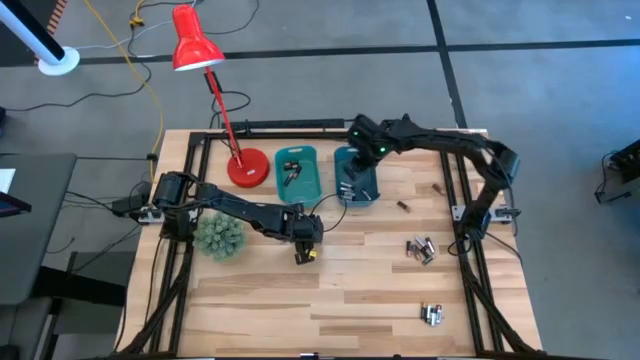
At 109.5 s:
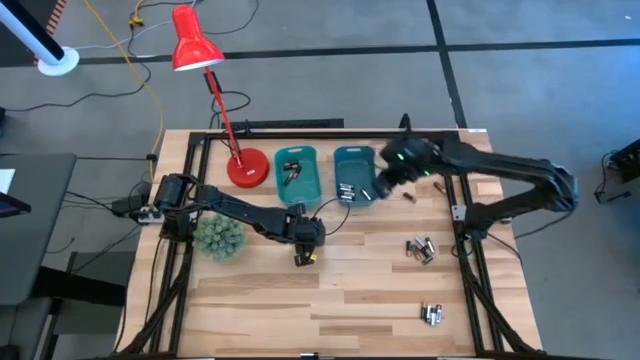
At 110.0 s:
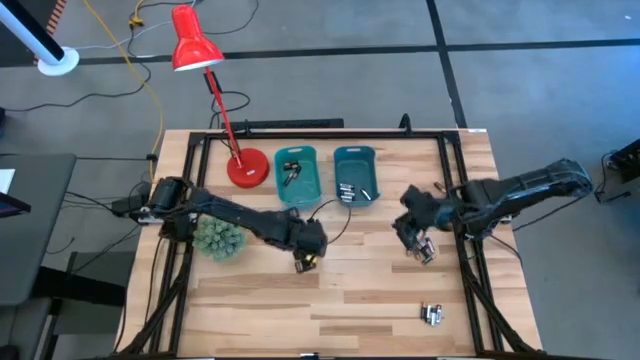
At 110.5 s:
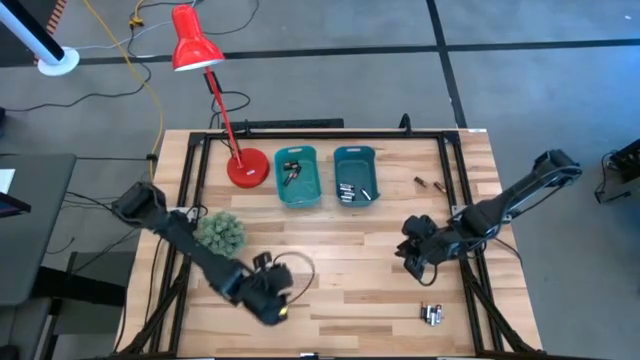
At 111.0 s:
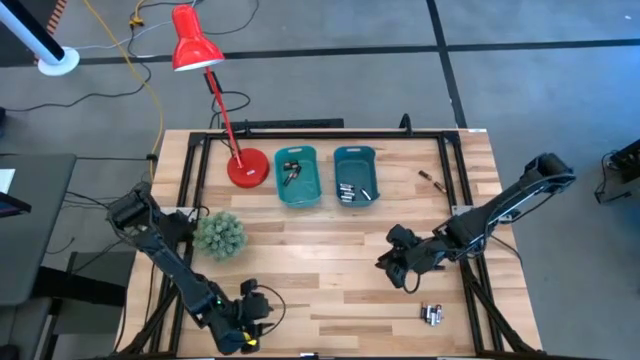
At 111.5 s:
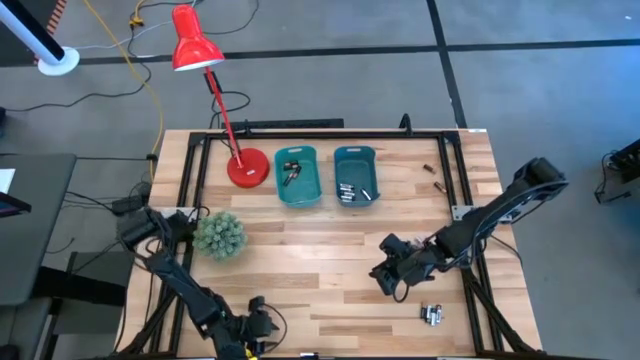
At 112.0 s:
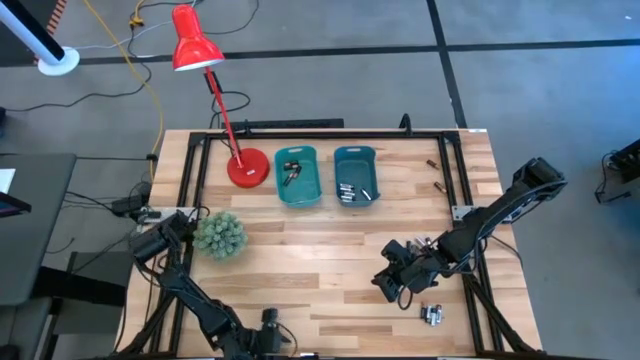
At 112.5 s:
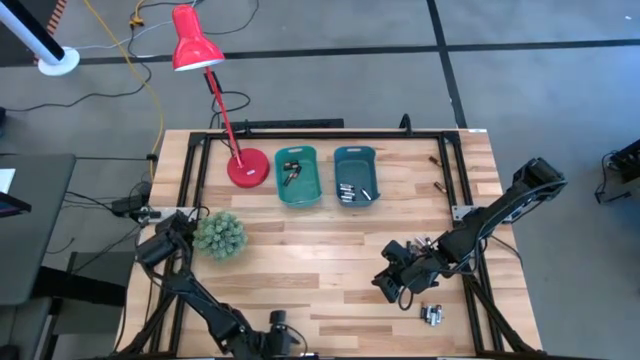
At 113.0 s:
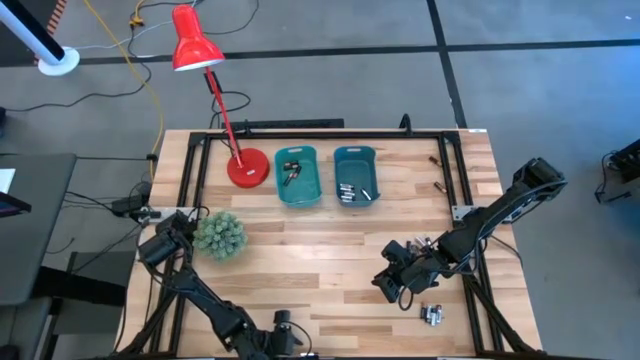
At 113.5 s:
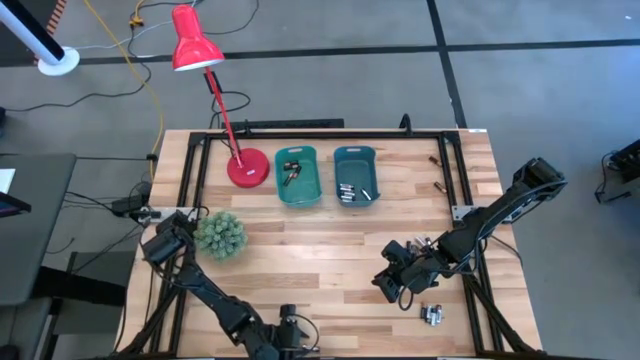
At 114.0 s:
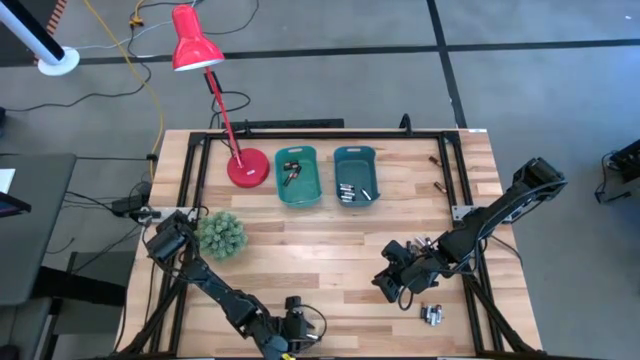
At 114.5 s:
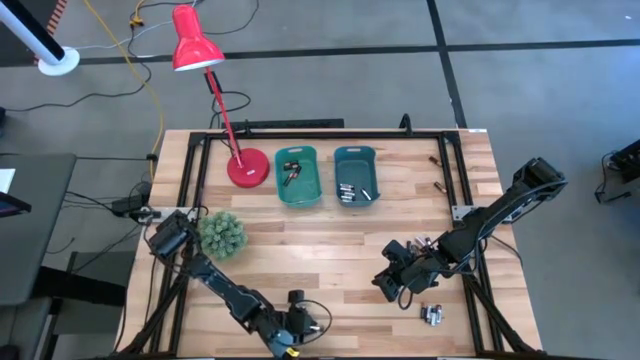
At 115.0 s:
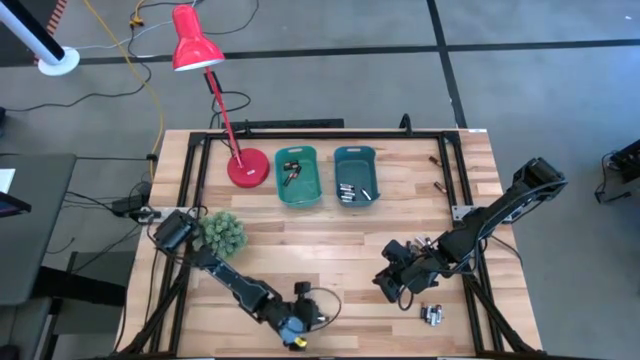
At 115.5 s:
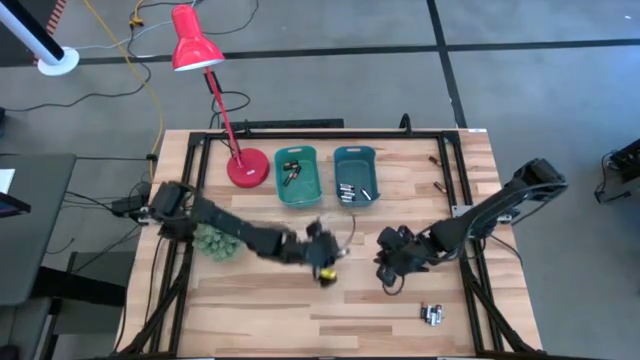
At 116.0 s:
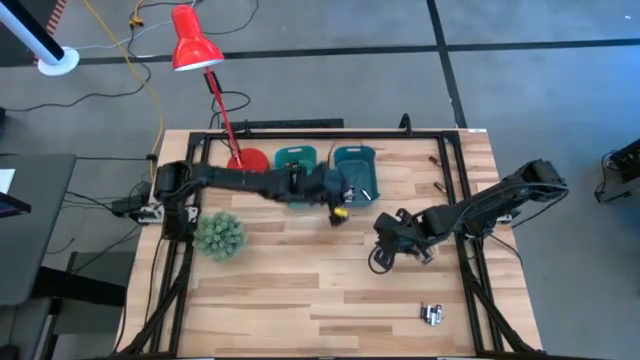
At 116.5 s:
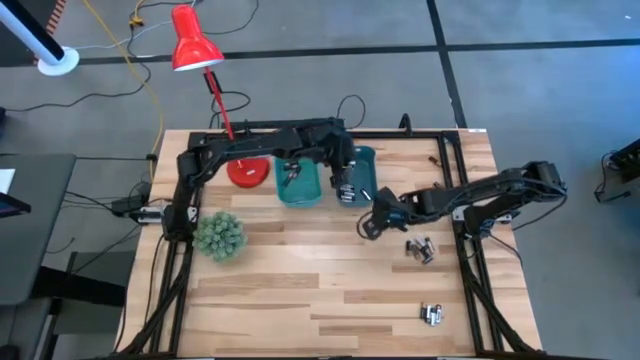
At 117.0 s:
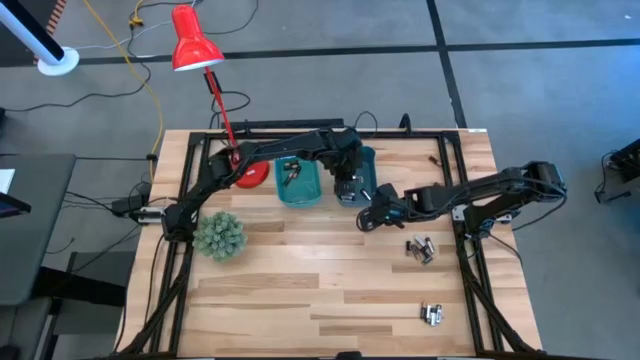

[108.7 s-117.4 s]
Task: Sort batteries
Put the silver battery into the blue bin

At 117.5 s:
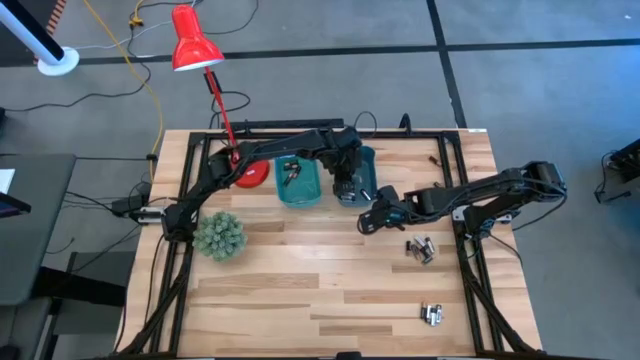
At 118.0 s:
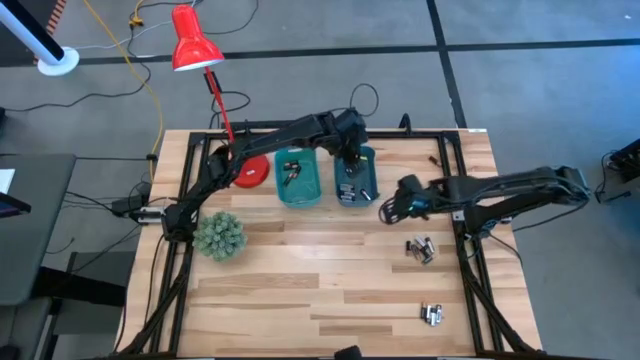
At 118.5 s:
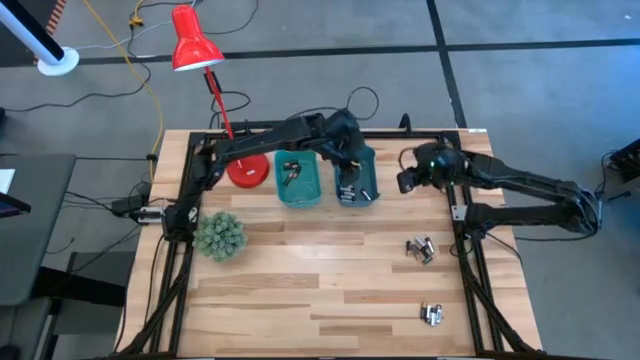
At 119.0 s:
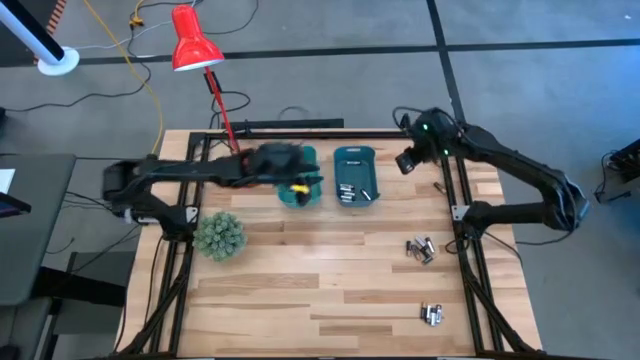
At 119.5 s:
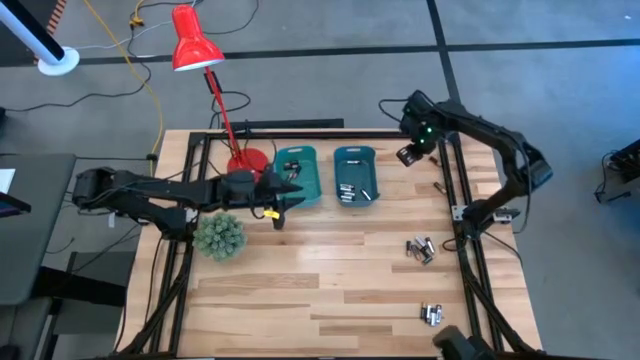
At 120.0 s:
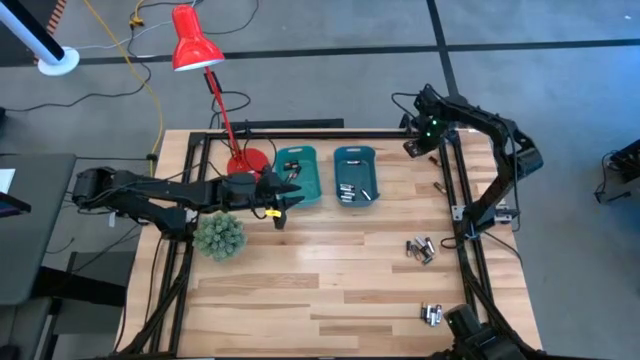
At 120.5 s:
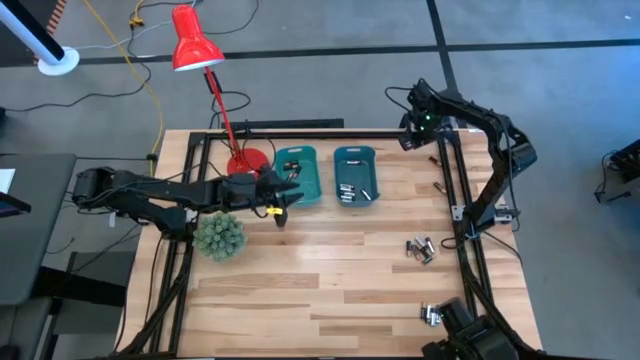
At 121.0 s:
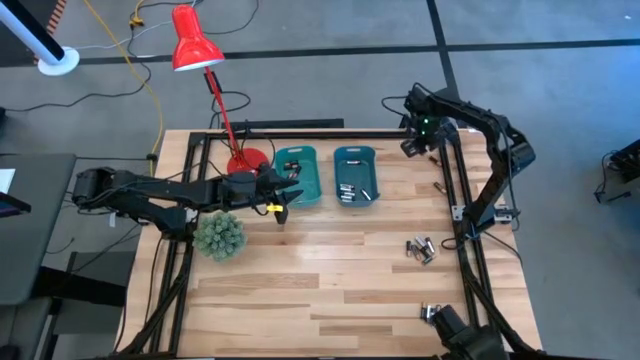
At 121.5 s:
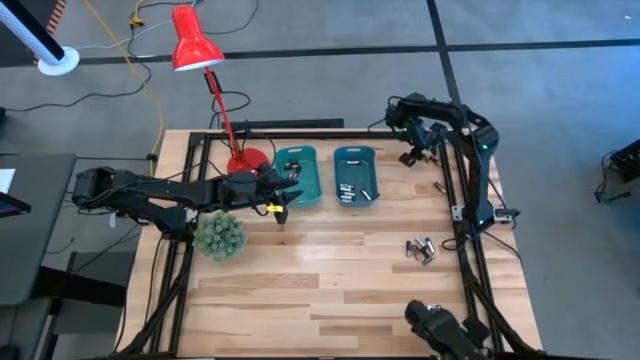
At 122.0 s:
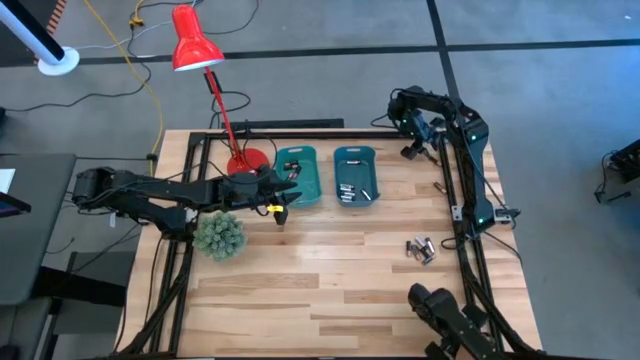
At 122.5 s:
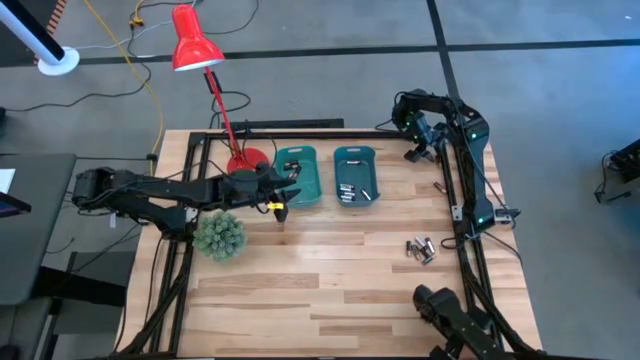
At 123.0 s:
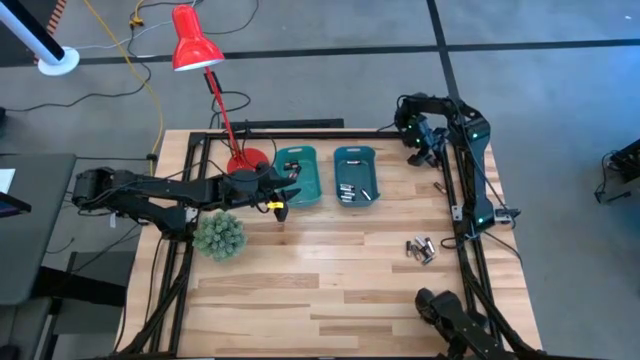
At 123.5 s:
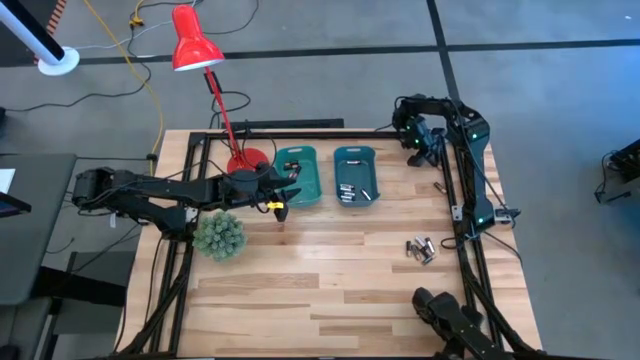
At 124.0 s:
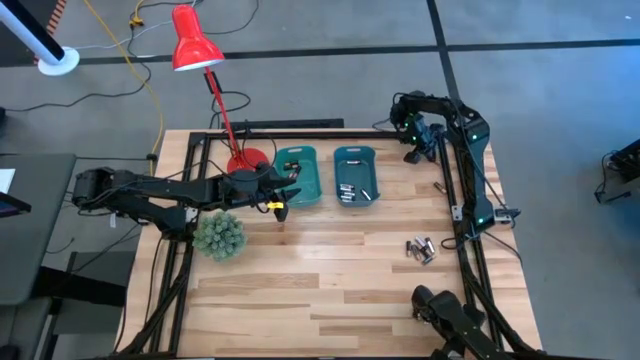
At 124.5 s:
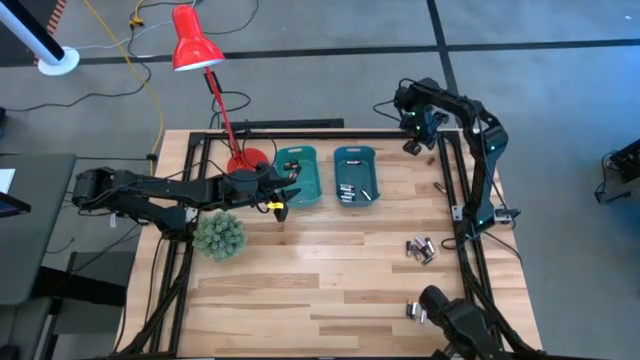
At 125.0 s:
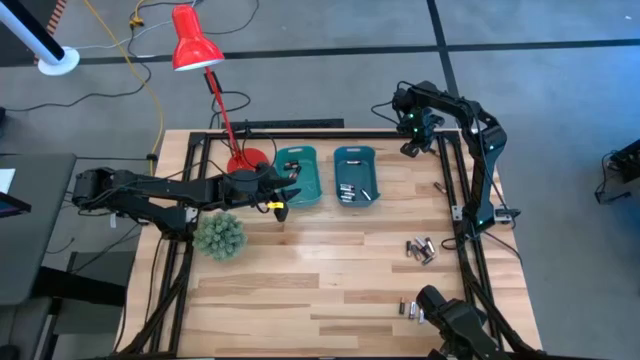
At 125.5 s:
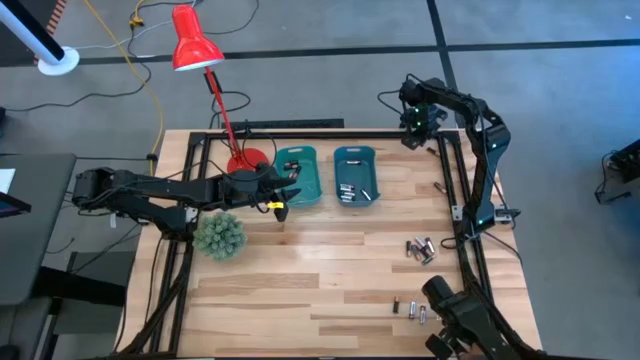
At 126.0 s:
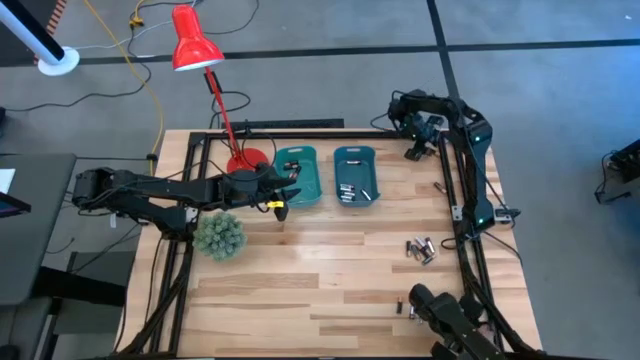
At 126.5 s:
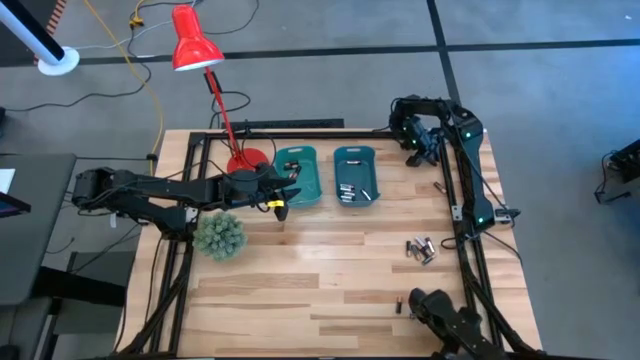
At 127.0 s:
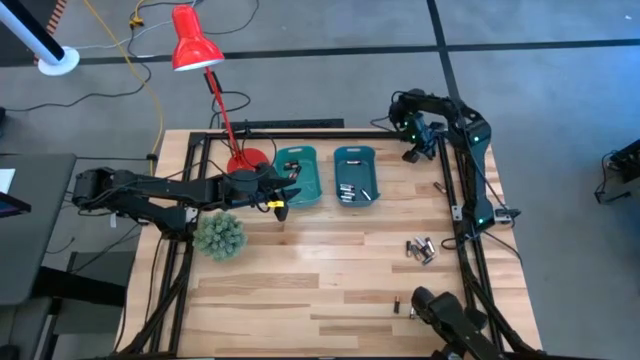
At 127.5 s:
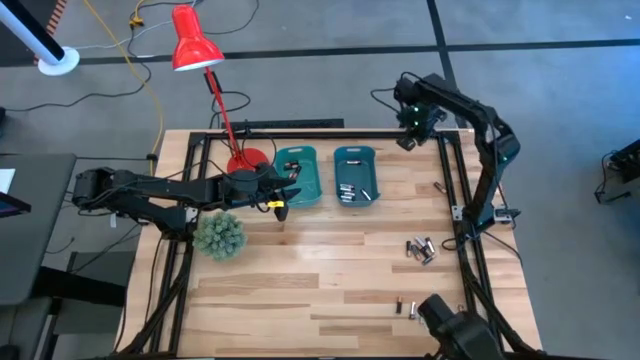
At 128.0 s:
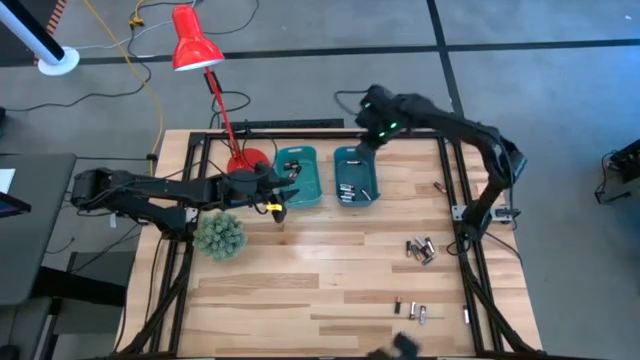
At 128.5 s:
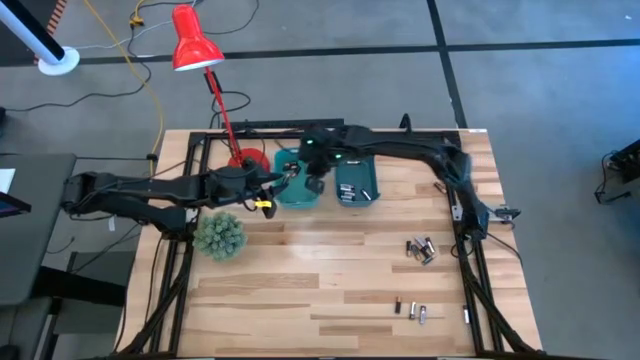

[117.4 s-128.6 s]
Put the black battery into the green bin

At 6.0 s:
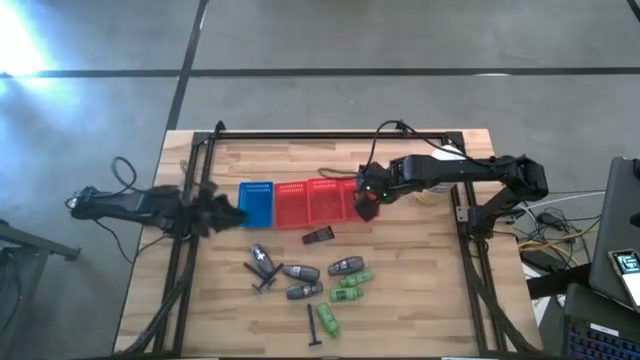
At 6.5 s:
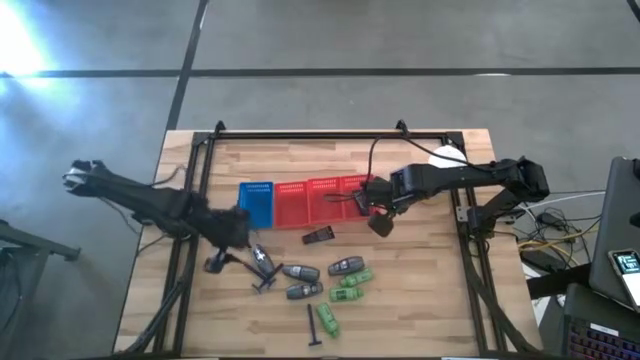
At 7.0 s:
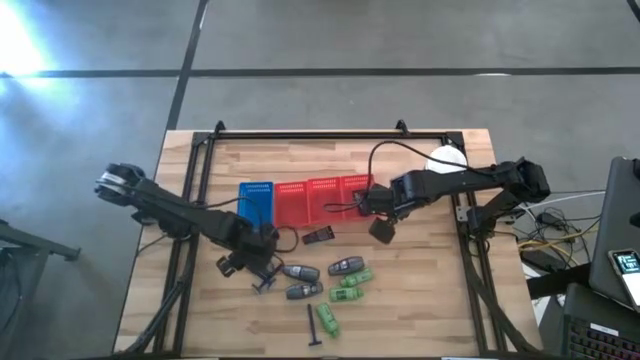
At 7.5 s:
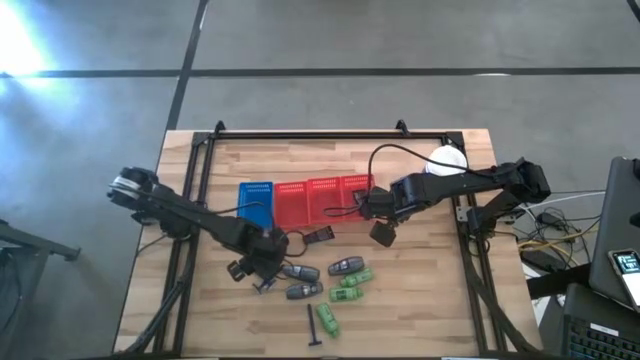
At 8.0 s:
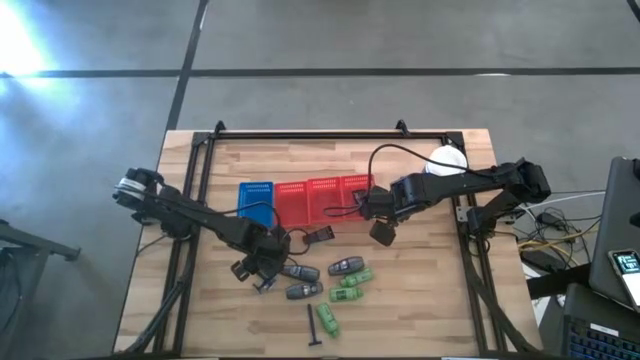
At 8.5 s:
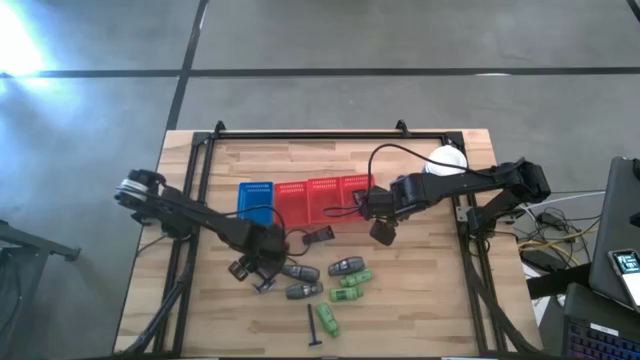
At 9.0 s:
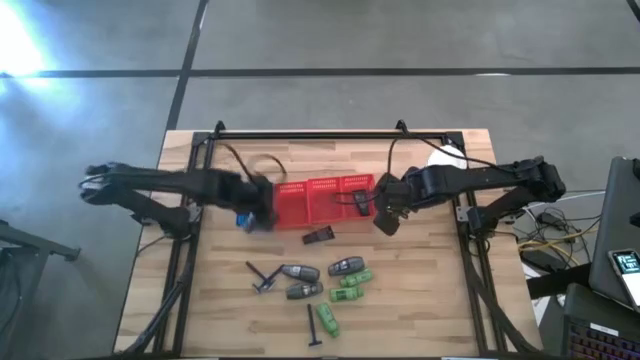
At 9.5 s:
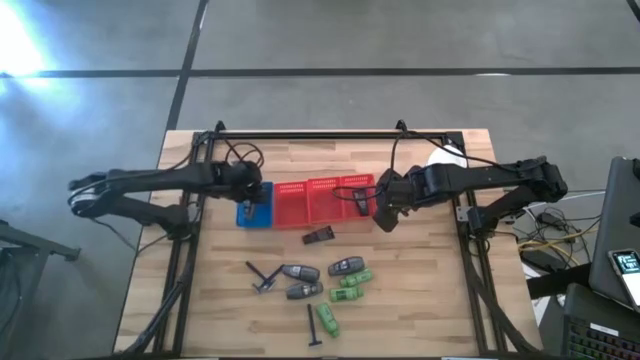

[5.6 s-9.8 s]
Task: Pick & Place Travel size toiletries
Put the gray deodorant into the blue bin
